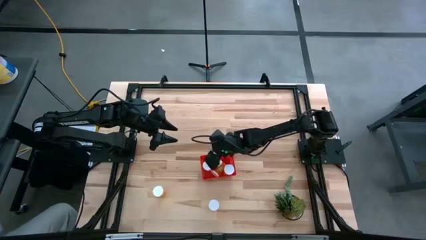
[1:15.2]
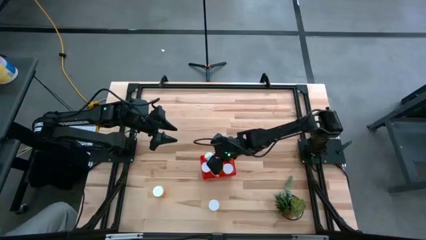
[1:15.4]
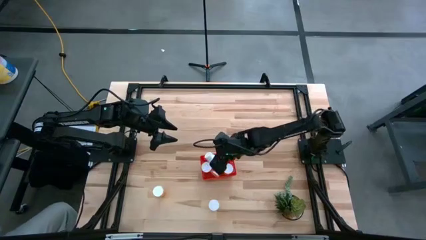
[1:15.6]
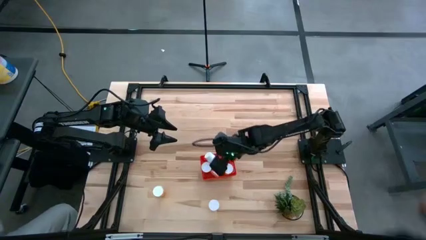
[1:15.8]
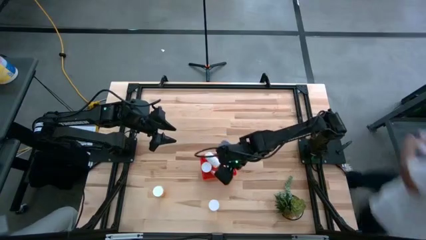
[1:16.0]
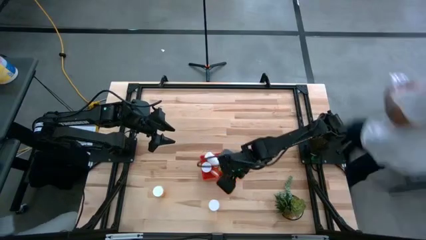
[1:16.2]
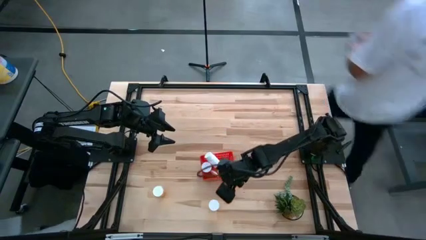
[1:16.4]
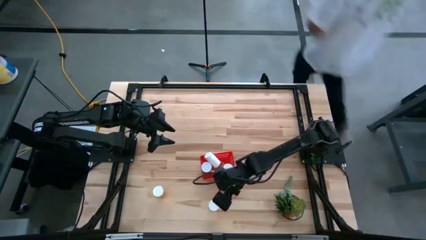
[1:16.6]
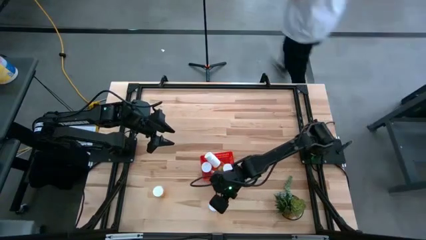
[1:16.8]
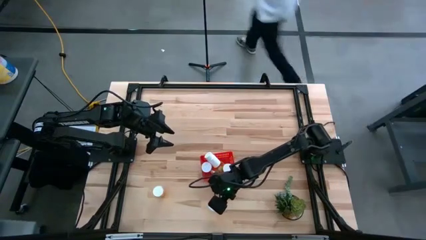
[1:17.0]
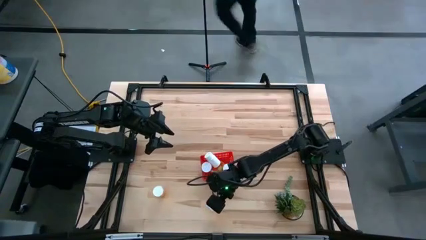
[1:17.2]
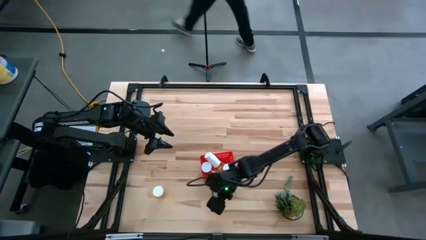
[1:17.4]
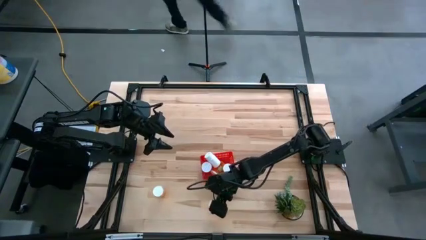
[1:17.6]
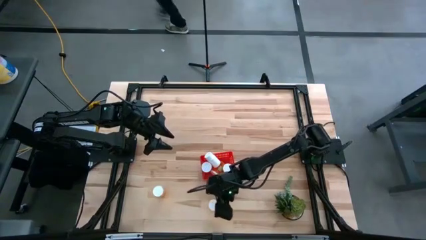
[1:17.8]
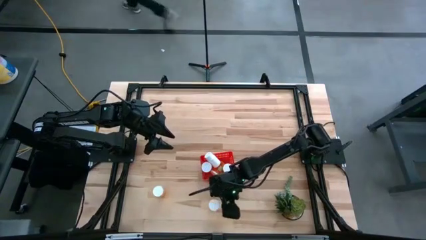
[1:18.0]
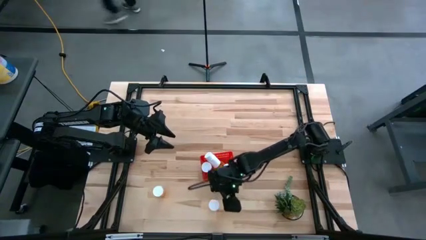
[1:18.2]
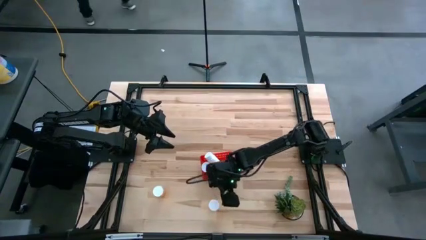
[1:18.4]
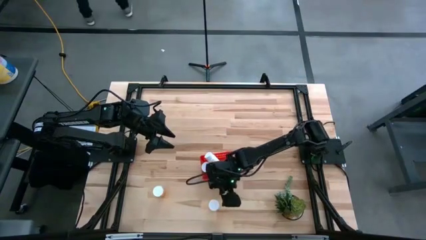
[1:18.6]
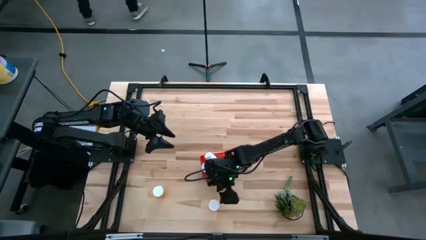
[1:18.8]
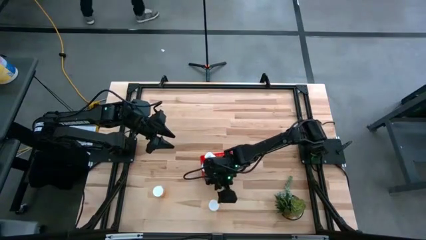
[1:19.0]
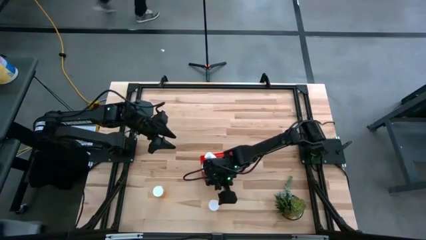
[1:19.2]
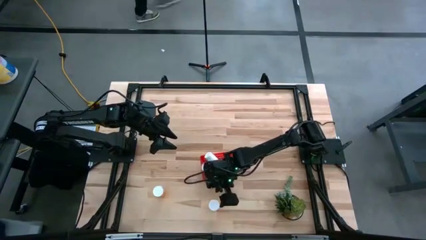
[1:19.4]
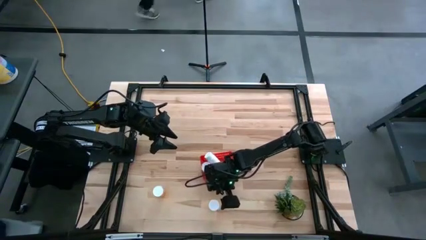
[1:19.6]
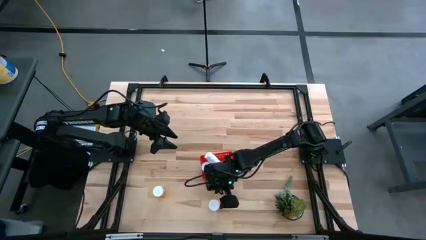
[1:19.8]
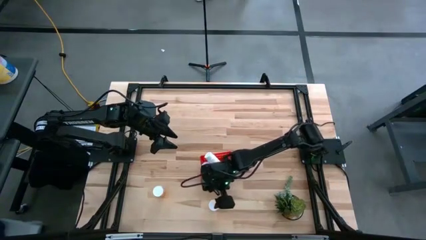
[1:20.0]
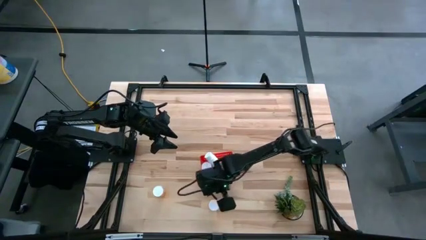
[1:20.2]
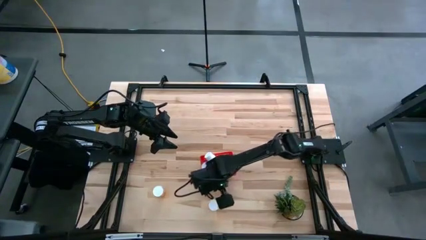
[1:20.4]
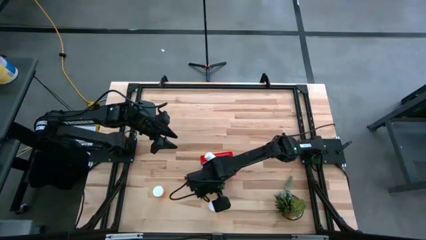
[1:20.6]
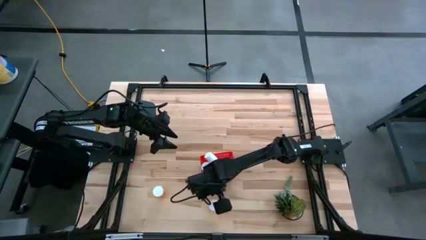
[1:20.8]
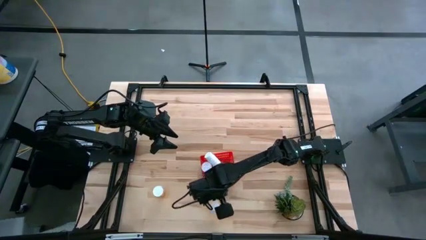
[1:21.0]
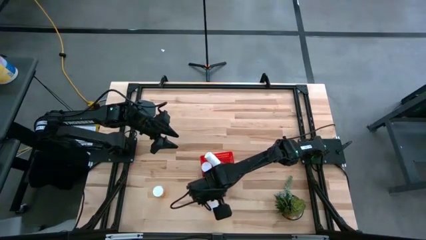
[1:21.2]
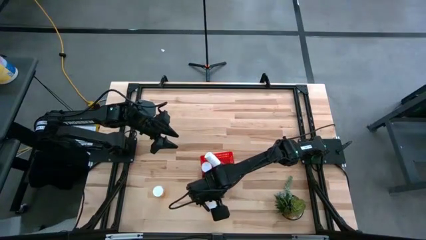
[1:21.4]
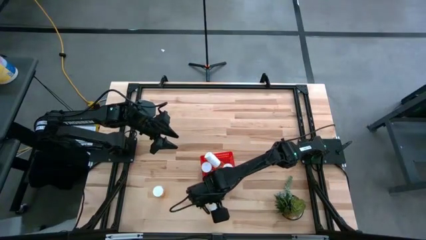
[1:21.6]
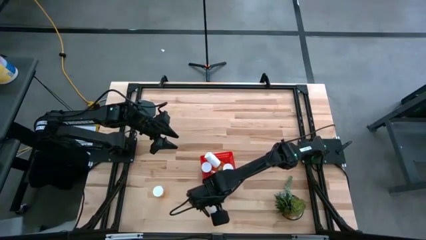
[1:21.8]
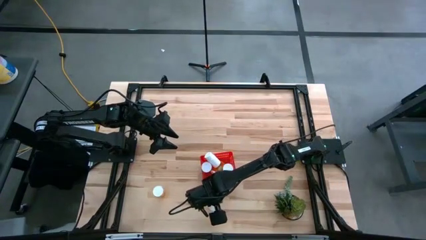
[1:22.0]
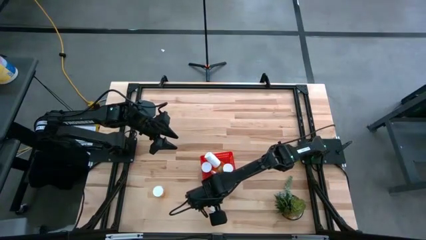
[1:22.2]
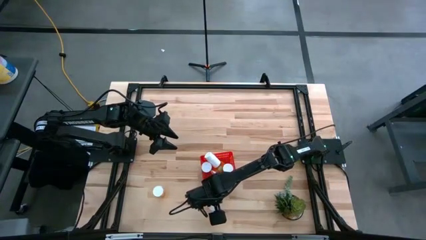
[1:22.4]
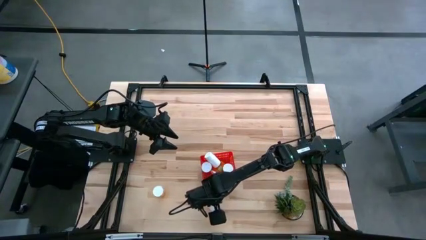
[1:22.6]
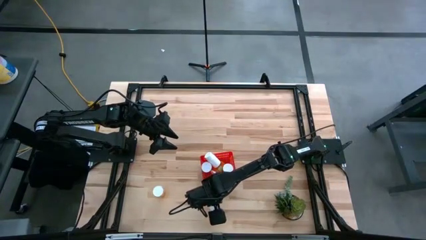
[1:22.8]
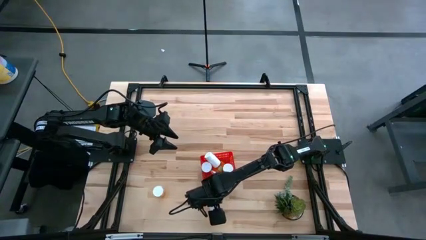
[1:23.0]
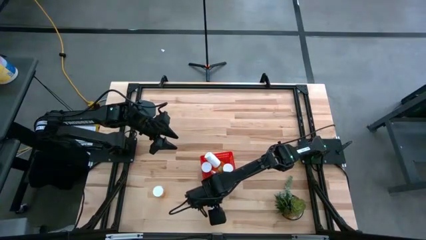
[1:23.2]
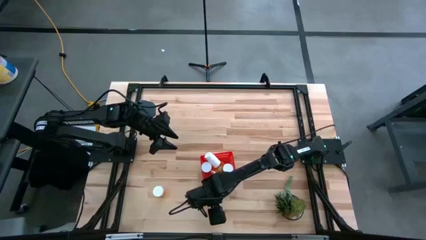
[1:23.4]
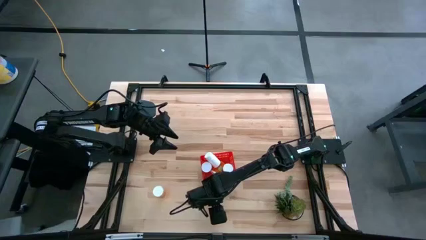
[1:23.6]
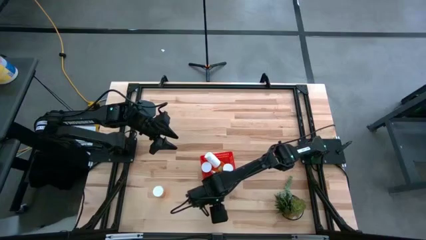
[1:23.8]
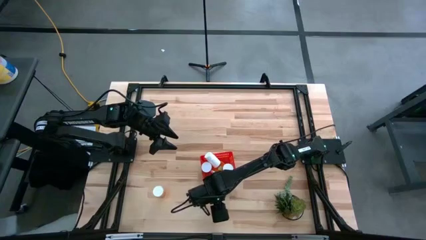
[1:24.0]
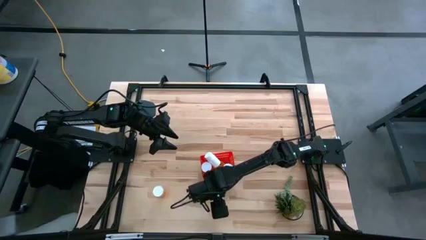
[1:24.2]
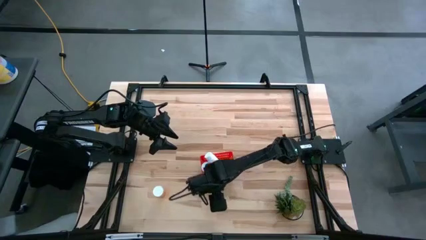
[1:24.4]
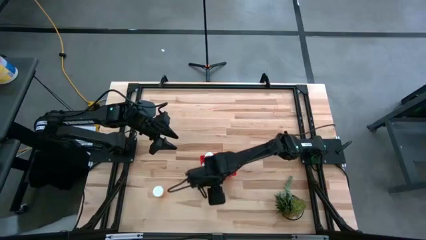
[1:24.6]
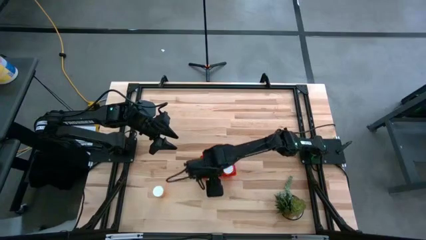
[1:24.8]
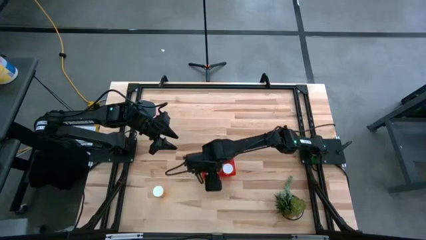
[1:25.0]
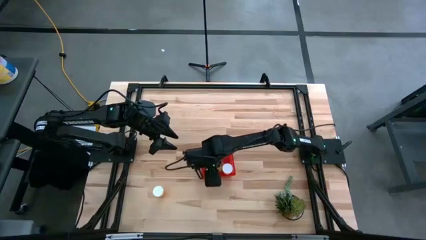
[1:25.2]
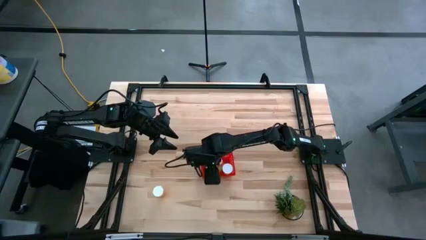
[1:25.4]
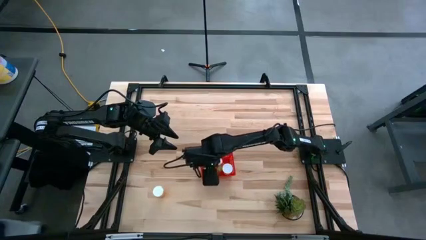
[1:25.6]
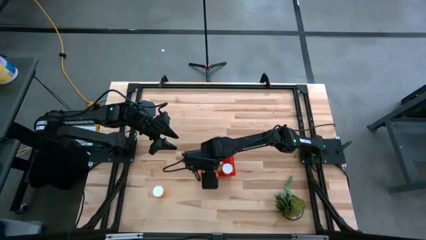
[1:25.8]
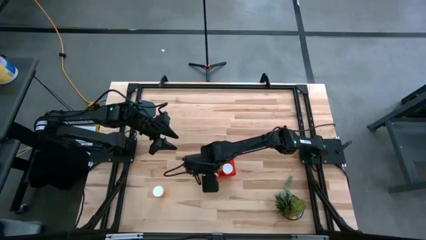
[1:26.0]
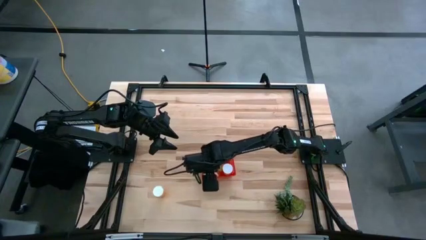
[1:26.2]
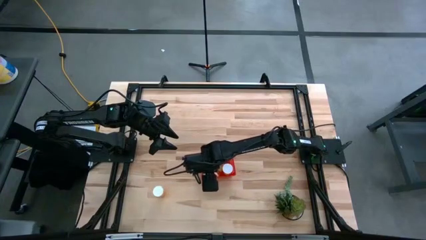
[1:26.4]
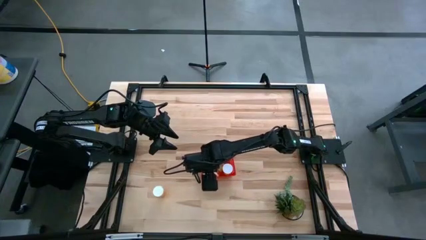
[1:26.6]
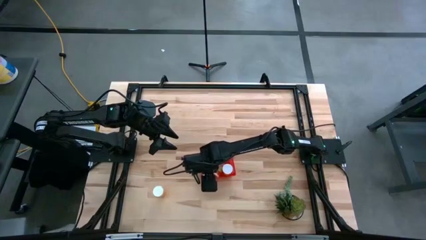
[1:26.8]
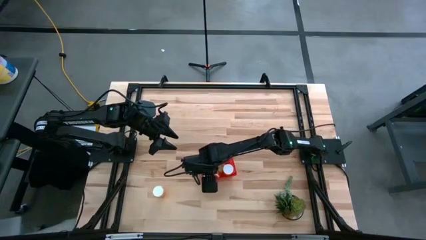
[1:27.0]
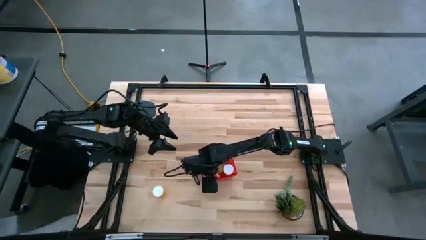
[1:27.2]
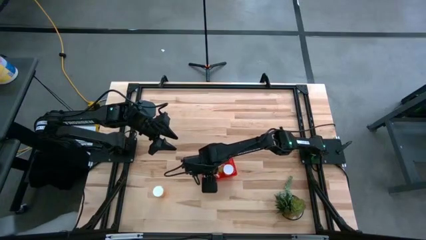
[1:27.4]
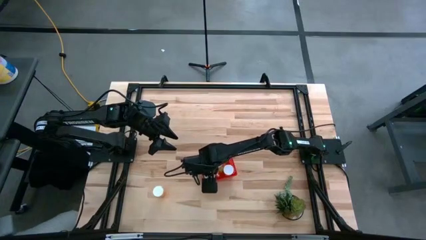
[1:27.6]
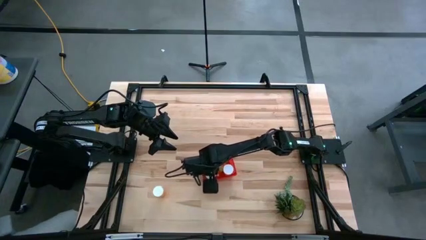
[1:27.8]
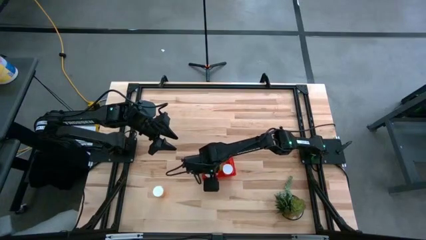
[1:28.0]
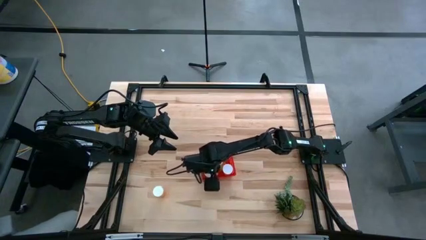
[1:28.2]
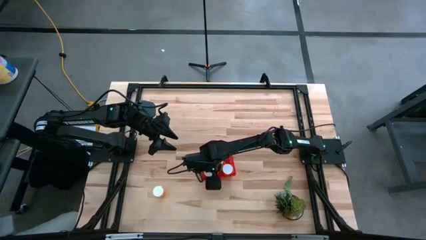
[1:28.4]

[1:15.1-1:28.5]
Task: Pick and place pill bottles into a basket
Put the orange pill bottle into the red basket

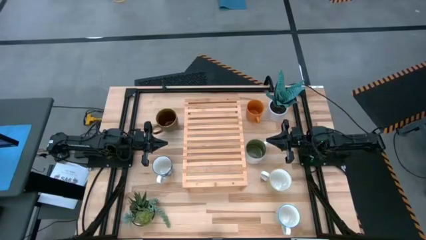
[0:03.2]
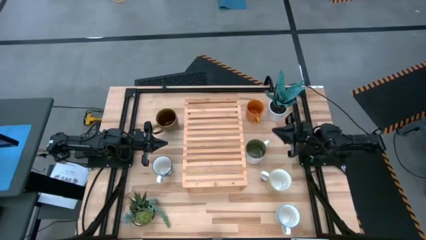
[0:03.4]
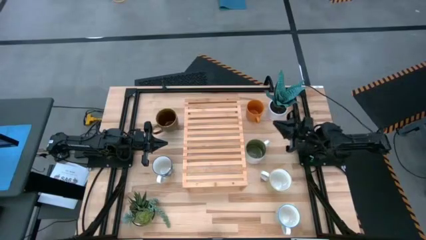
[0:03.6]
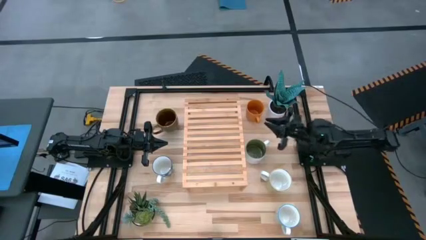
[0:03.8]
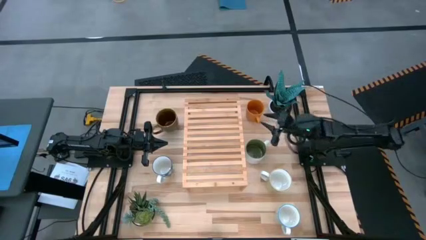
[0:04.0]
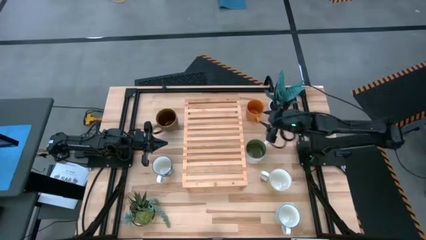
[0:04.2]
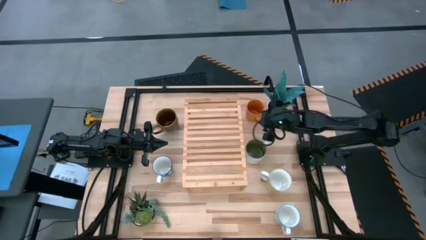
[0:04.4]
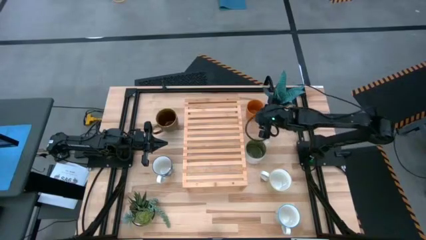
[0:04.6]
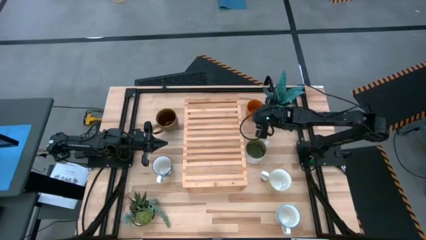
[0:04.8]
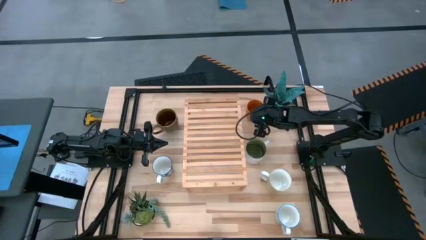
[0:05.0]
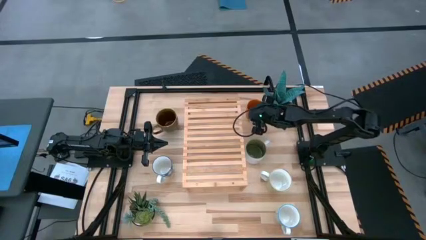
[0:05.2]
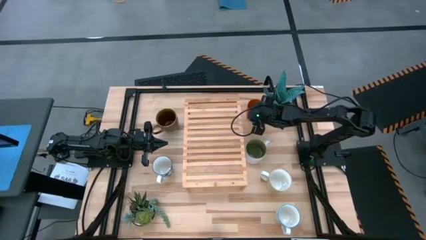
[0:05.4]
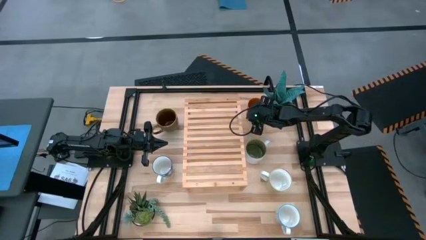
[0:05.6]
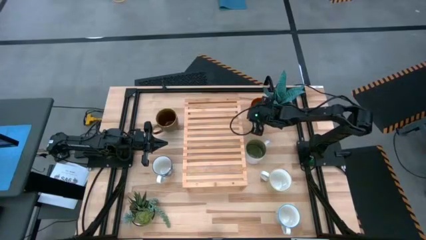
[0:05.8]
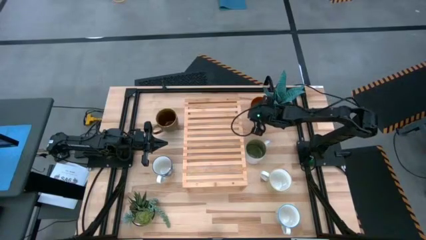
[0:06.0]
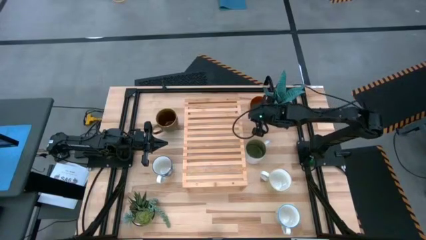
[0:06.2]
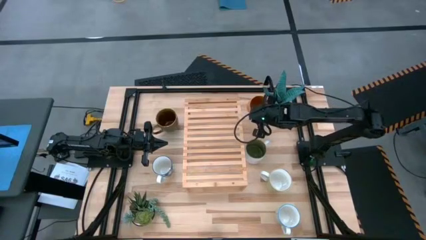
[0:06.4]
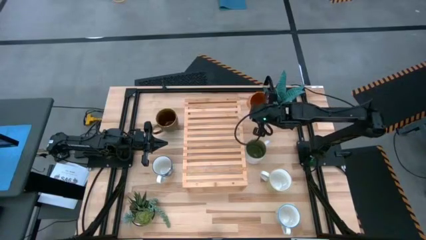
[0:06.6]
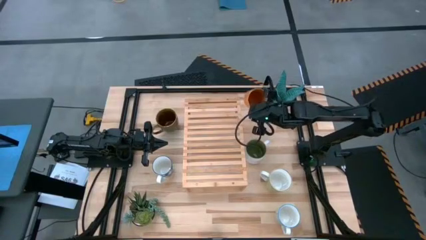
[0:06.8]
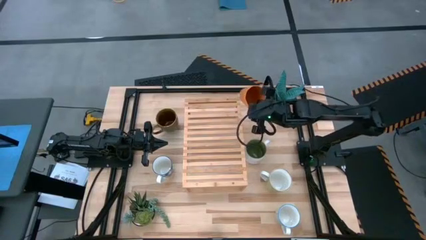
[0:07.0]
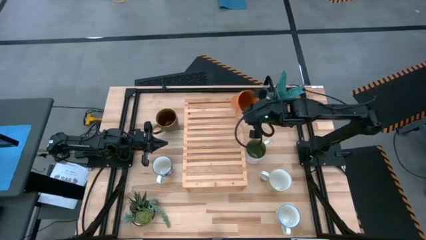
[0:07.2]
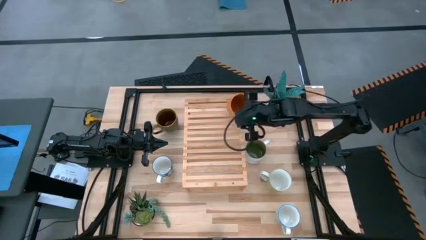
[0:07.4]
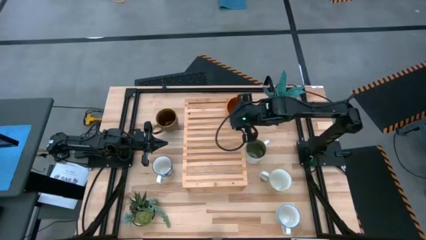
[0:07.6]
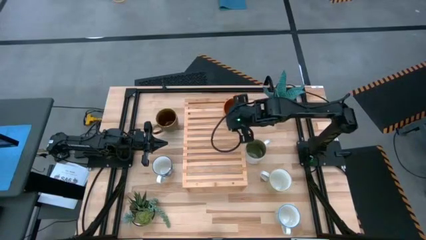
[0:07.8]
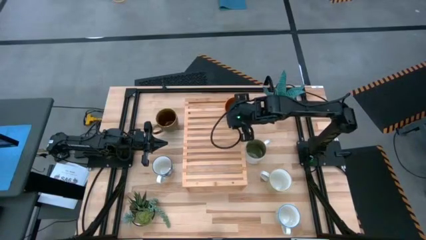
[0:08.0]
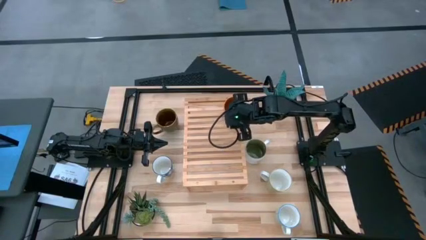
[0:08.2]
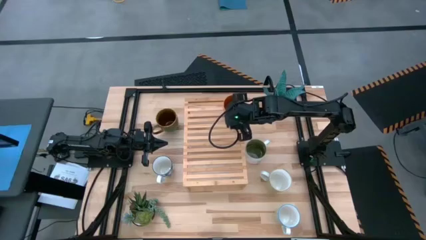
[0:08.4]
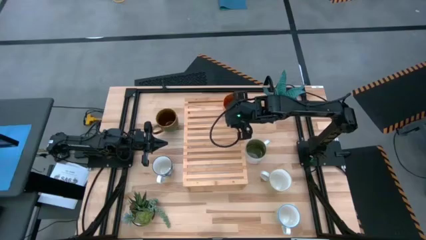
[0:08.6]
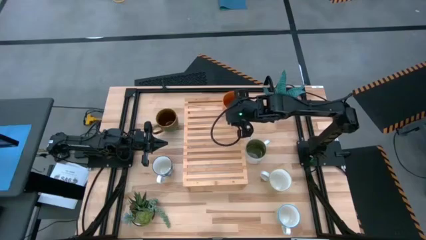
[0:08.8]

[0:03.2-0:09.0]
Task: Place coffee mugs
Put the orange mug on the shelf
